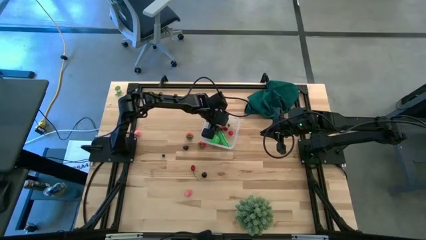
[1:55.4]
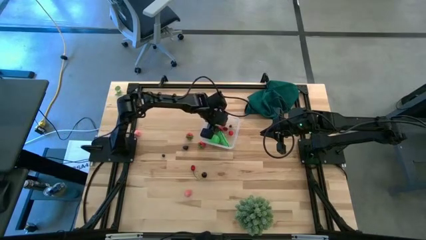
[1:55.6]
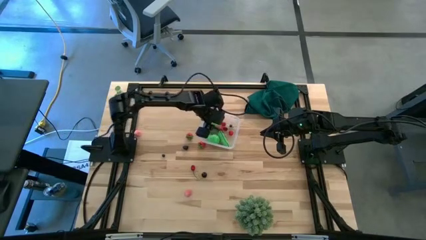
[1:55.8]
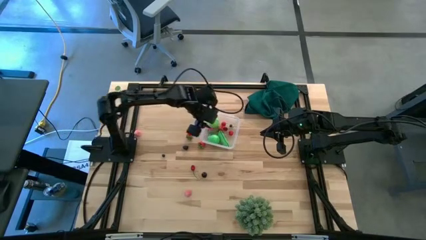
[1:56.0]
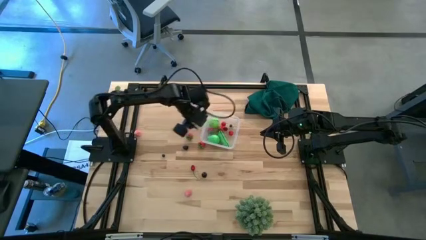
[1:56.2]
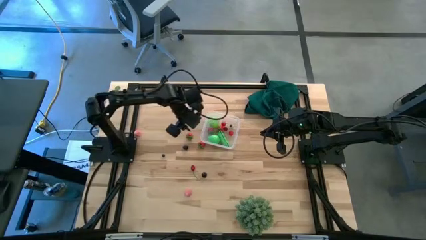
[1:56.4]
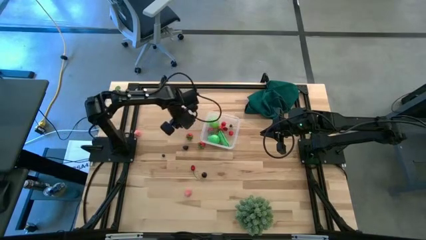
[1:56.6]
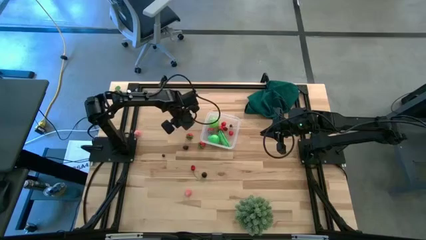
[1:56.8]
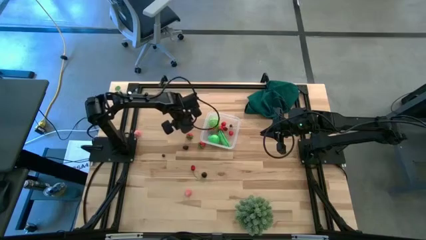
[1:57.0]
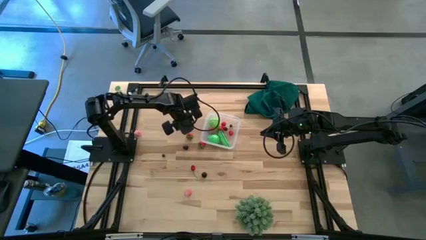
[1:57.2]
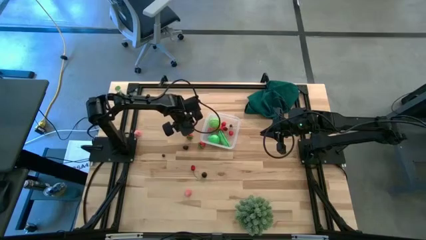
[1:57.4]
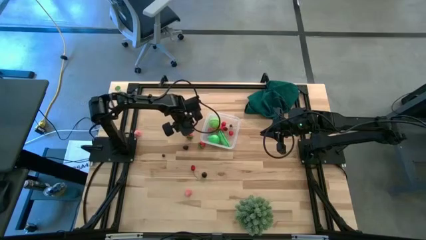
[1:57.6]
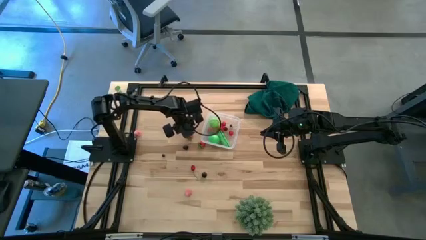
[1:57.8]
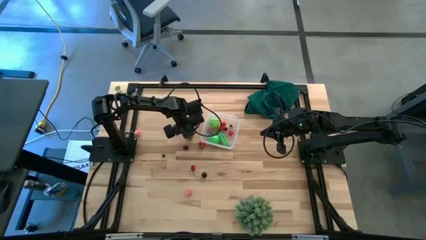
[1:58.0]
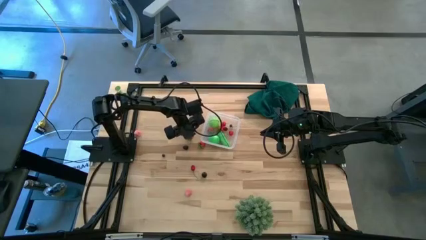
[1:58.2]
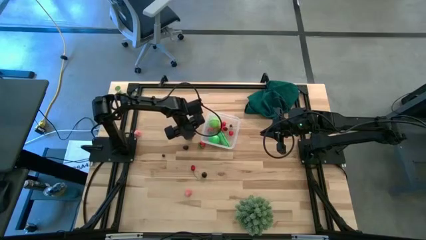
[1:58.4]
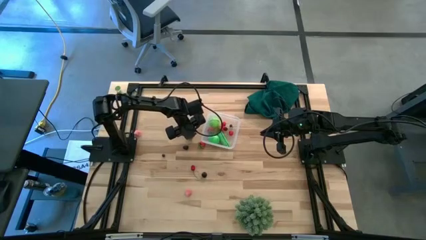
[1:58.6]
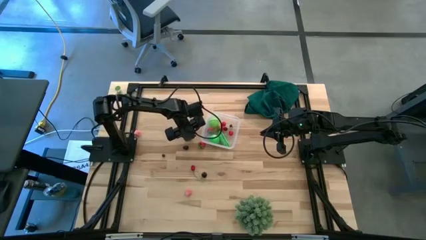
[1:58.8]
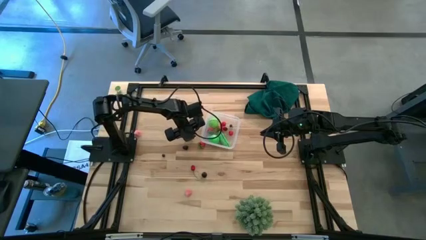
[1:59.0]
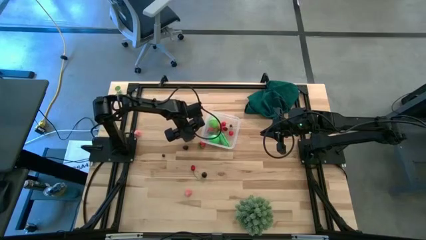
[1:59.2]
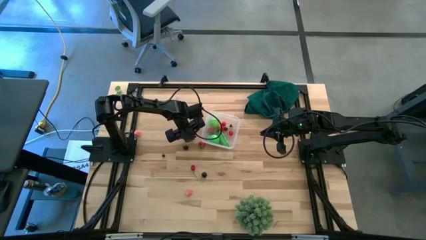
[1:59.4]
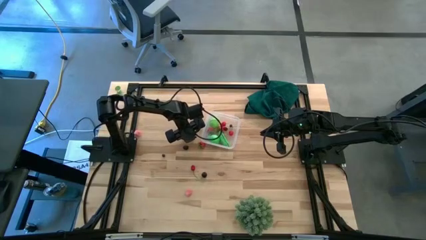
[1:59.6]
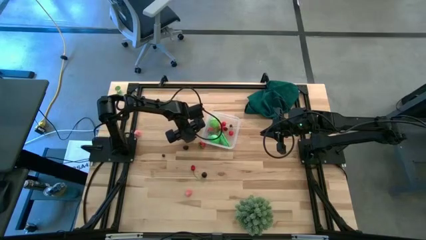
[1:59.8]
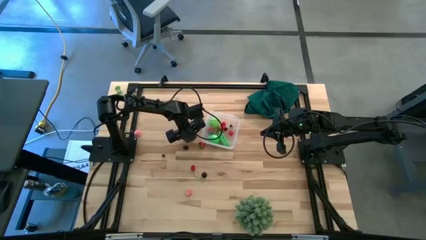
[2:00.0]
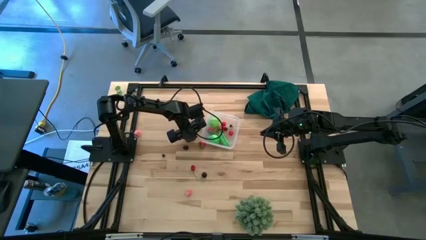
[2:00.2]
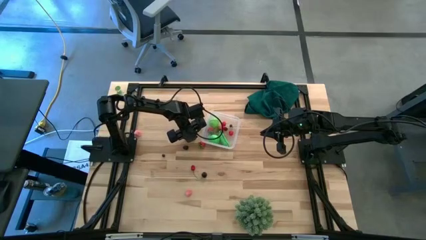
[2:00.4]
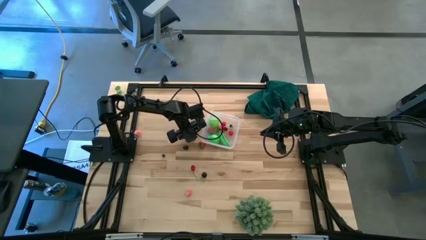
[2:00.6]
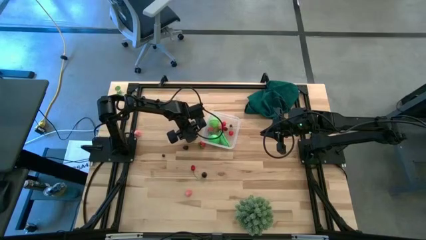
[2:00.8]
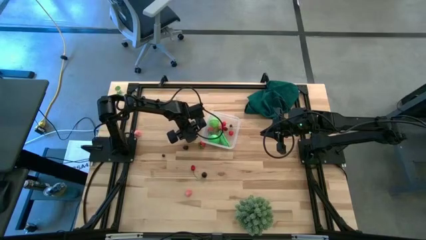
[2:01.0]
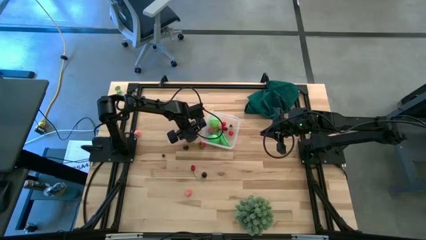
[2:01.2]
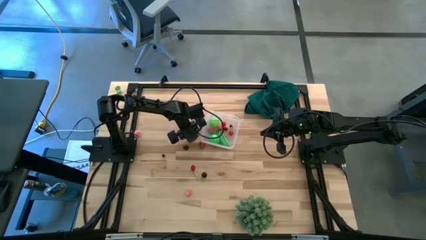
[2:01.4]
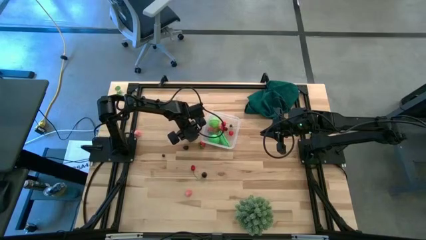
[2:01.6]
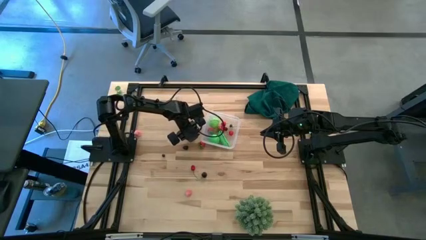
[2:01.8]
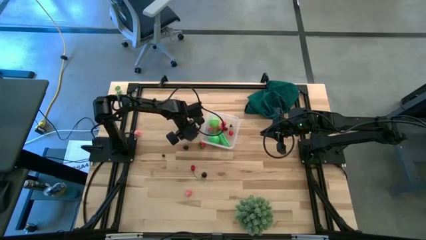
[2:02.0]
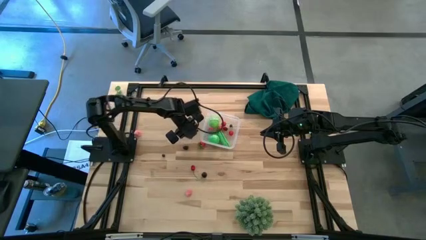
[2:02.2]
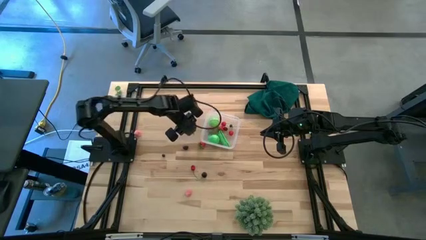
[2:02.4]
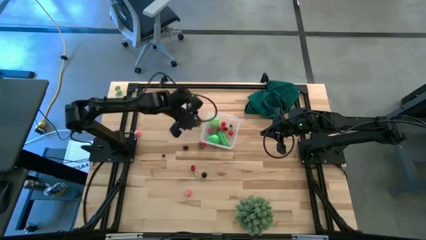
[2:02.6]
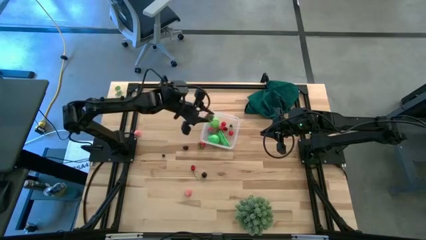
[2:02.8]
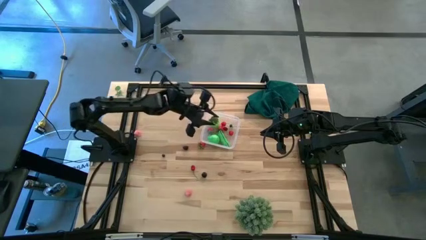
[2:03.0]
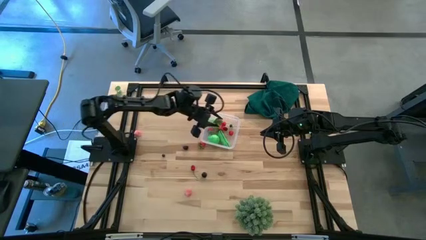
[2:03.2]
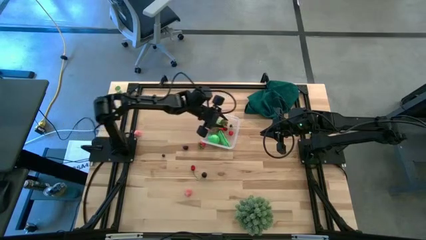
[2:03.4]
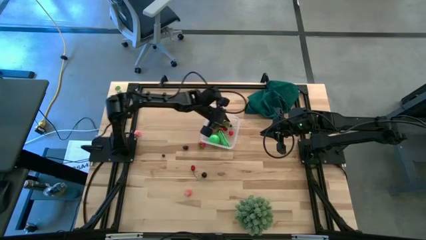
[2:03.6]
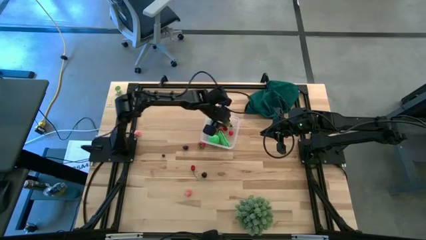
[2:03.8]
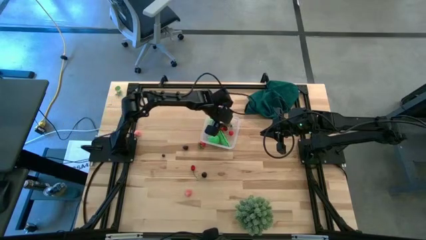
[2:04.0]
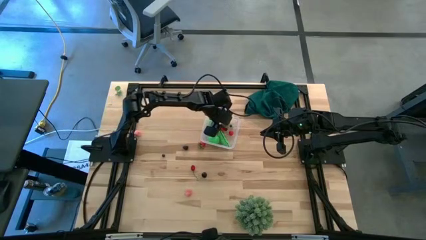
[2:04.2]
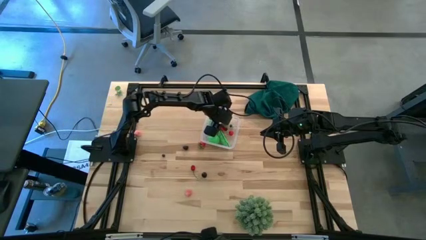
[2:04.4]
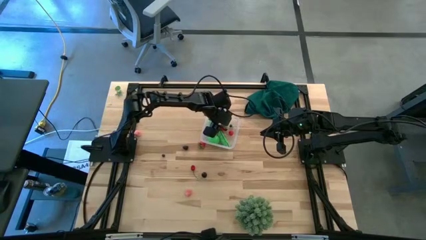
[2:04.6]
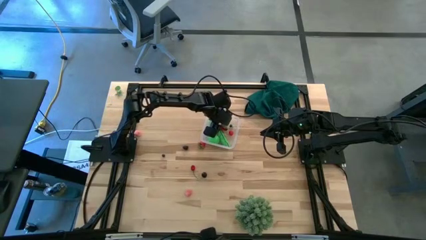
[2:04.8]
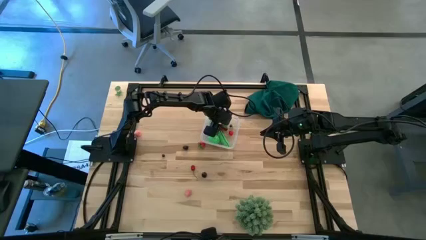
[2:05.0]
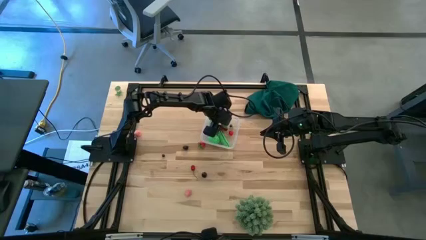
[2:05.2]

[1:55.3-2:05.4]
Task: Pick and placing Produce into tupperware
Put the red strawberry into the transparent bin

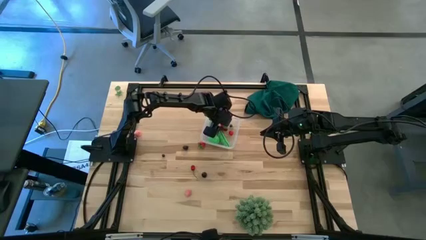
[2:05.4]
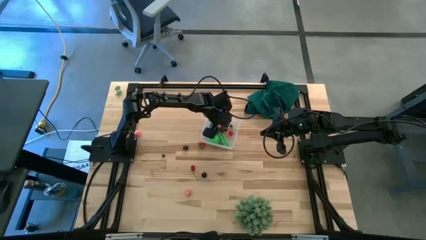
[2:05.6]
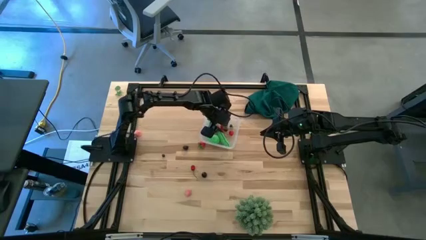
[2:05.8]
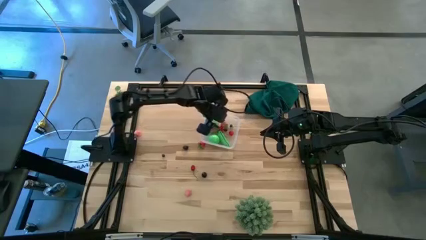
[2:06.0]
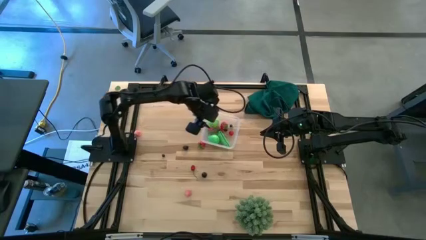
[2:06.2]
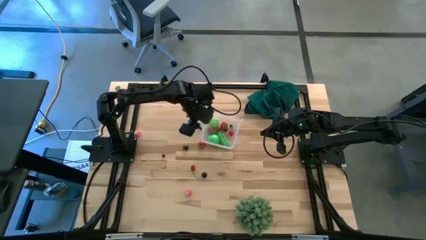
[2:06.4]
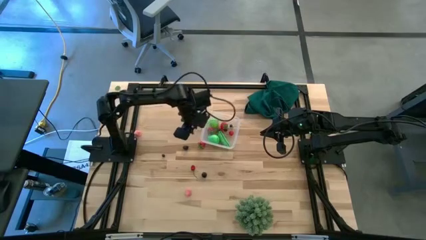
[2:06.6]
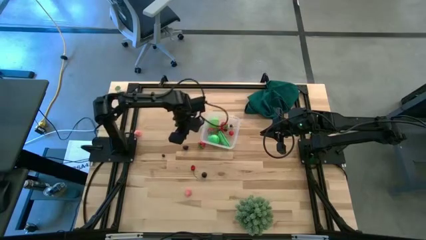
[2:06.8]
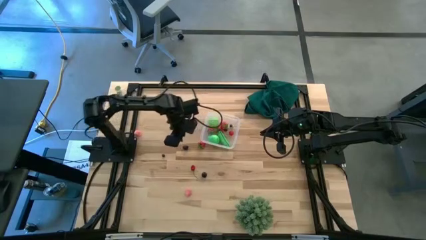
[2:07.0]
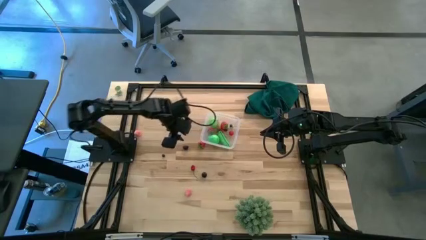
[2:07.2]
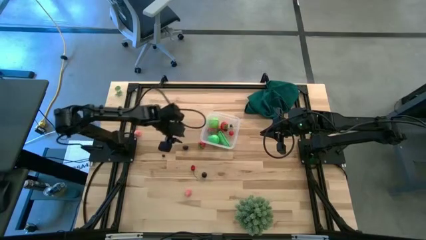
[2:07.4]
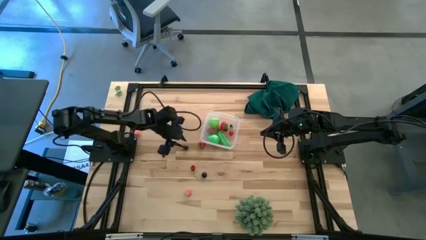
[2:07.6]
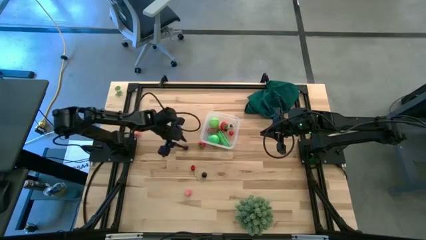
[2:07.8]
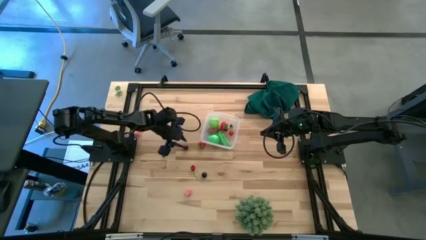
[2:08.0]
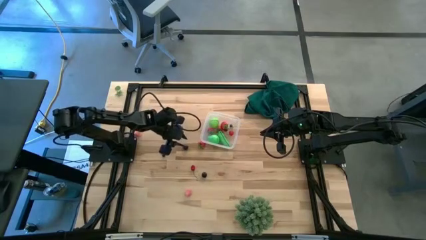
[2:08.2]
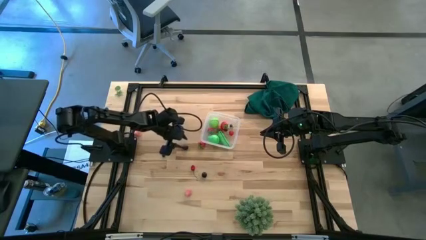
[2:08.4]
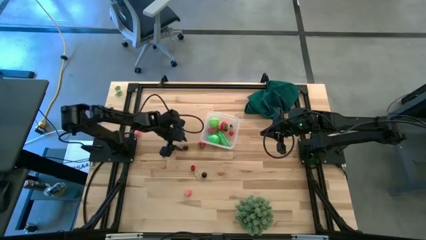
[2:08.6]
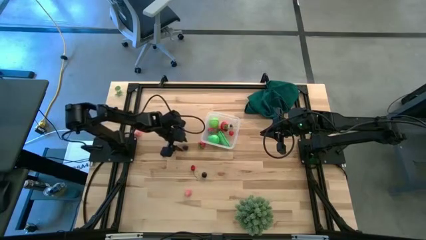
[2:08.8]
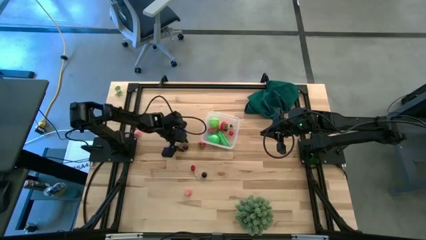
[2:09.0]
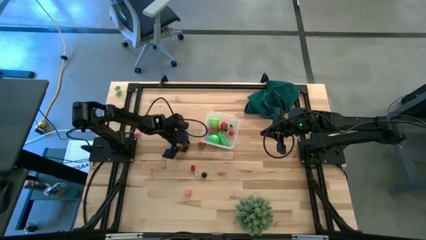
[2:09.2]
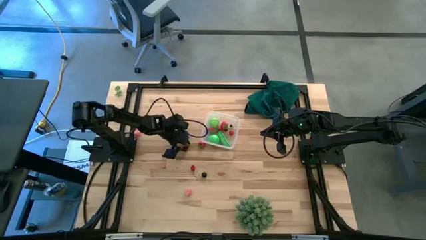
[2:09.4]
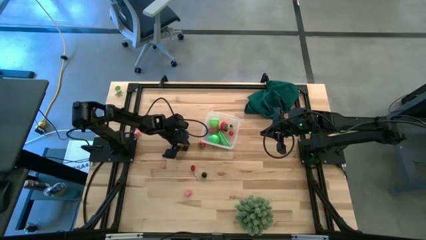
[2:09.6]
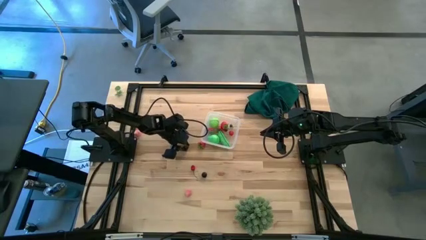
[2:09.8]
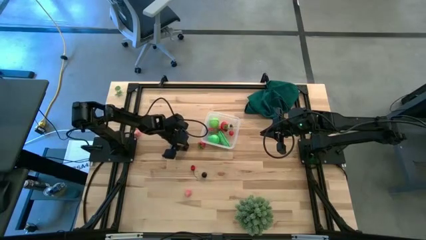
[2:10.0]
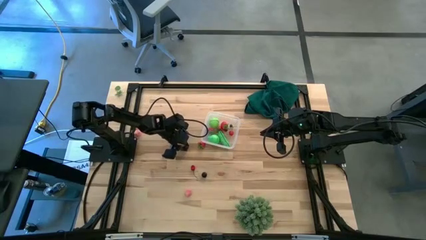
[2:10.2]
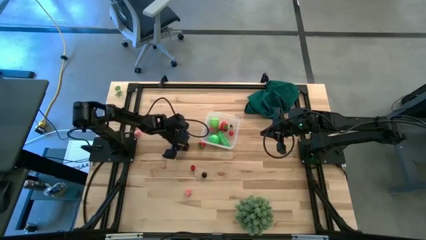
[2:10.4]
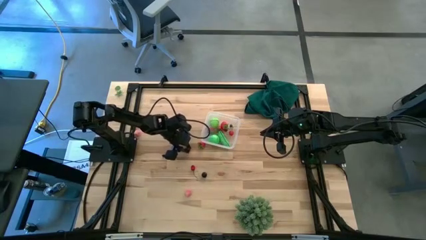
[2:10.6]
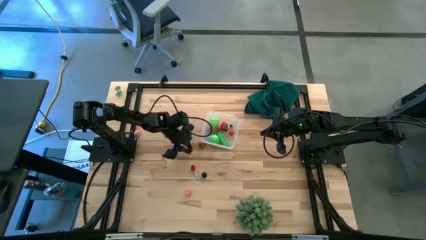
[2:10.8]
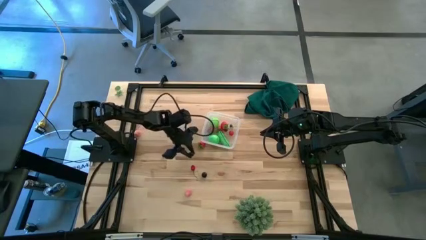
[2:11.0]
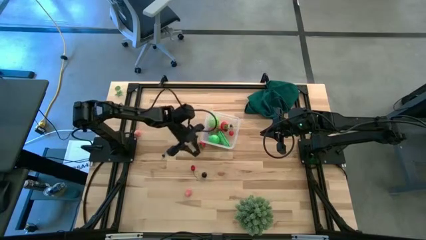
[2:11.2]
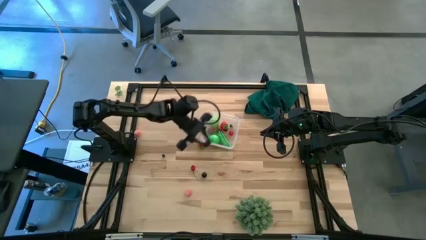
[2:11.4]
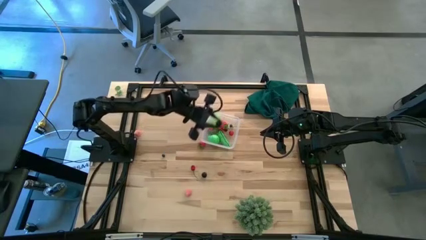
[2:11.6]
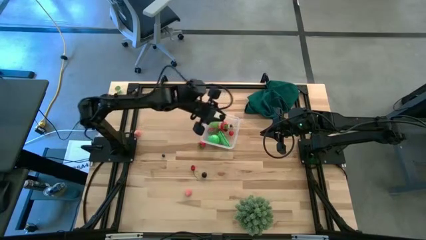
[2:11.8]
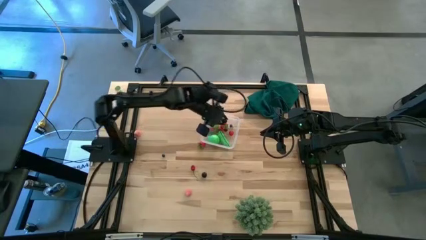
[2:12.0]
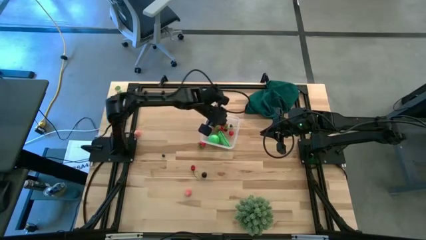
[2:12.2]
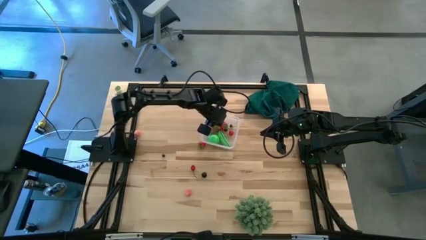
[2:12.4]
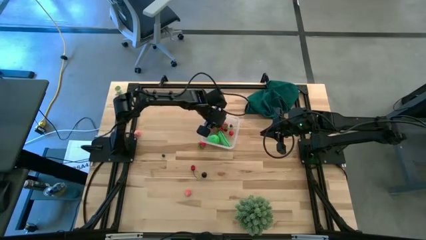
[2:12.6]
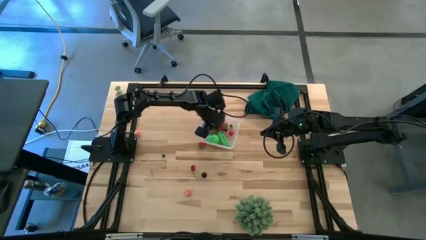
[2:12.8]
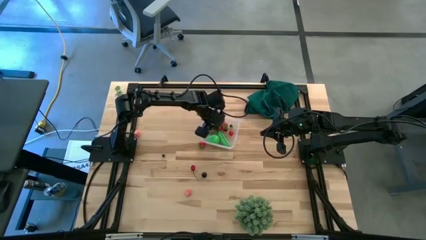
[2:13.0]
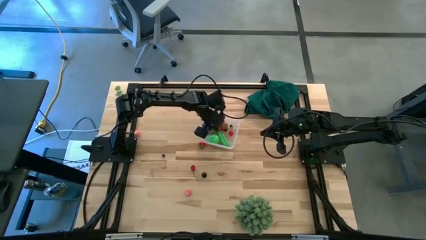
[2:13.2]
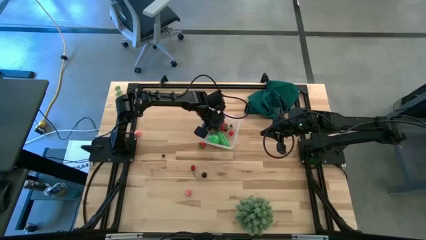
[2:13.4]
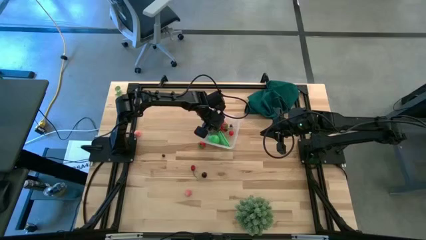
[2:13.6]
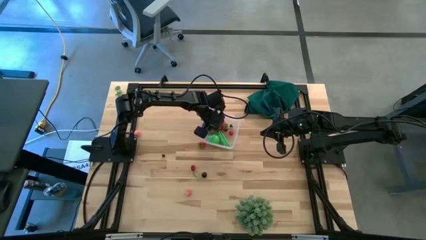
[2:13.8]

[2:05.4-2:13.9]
Put the blackberry into the transparent bin
